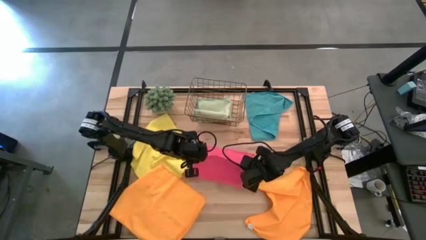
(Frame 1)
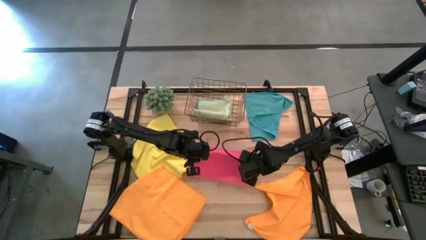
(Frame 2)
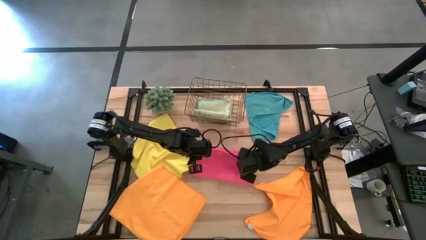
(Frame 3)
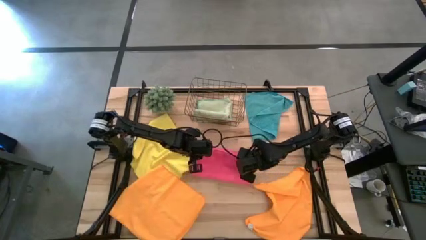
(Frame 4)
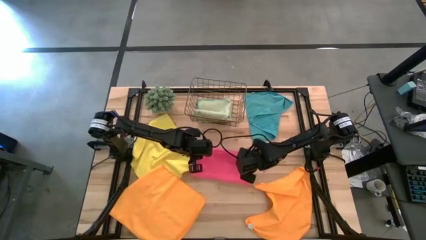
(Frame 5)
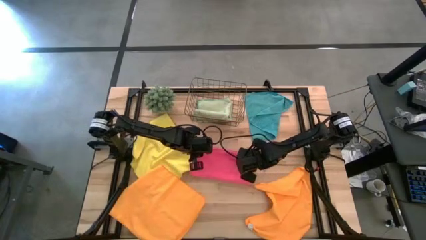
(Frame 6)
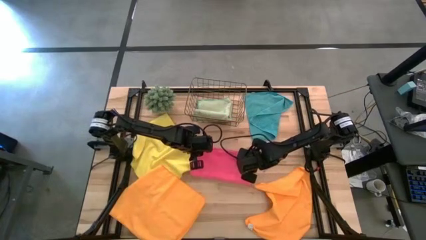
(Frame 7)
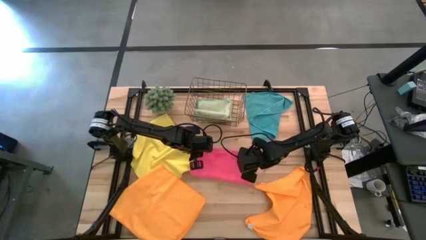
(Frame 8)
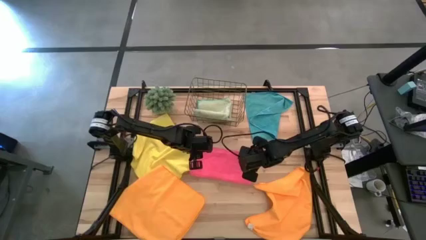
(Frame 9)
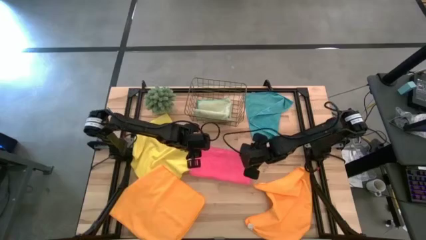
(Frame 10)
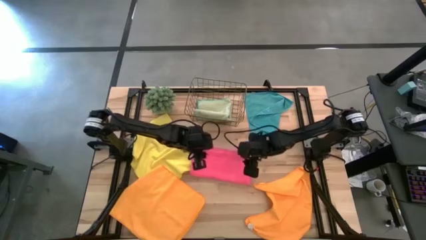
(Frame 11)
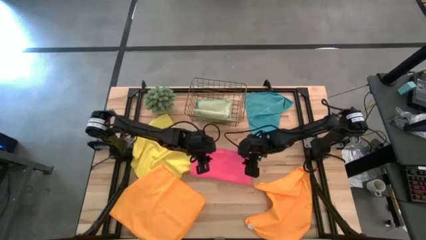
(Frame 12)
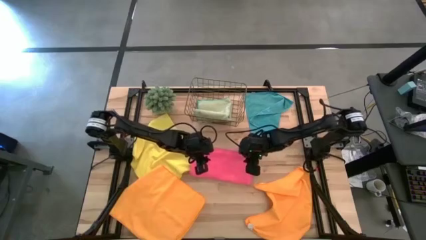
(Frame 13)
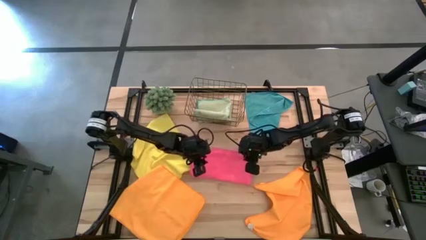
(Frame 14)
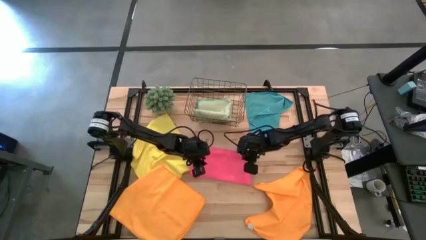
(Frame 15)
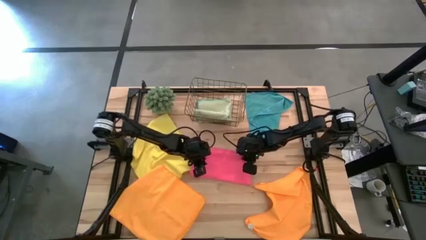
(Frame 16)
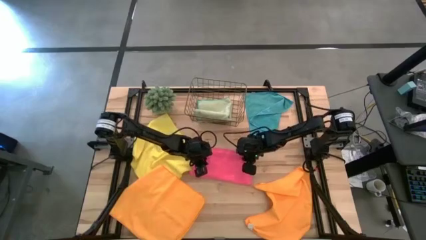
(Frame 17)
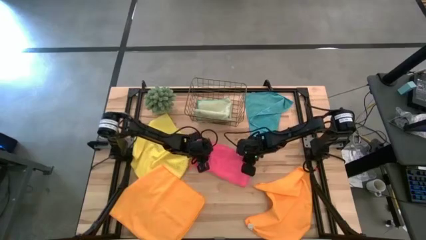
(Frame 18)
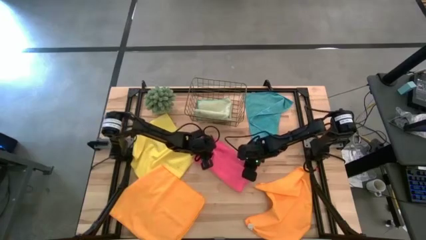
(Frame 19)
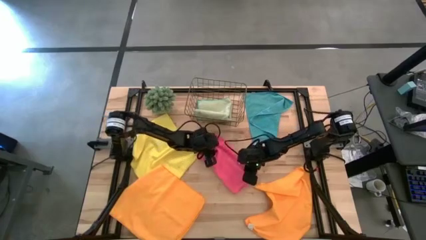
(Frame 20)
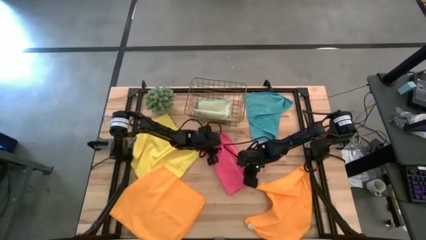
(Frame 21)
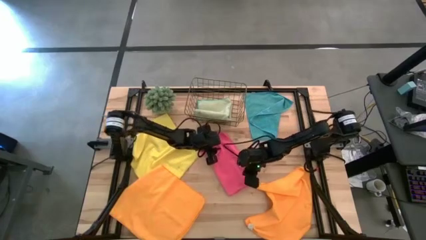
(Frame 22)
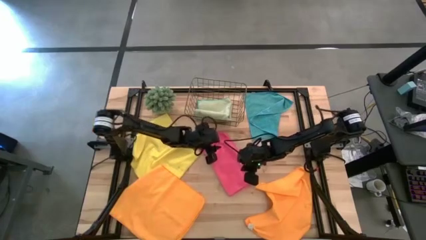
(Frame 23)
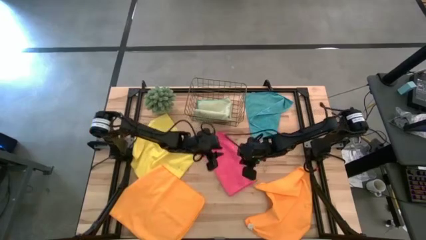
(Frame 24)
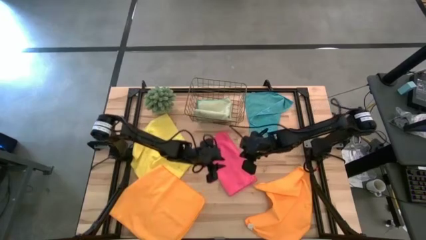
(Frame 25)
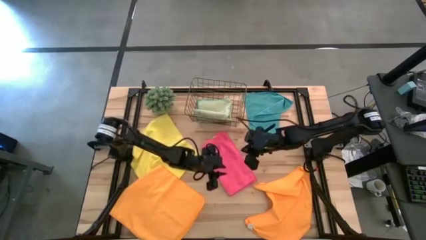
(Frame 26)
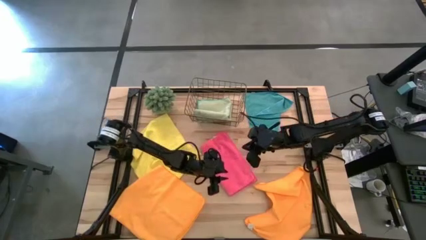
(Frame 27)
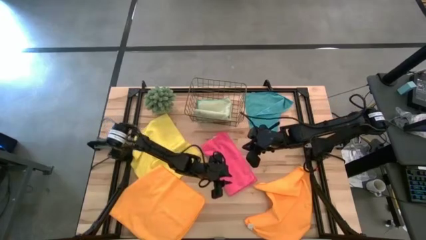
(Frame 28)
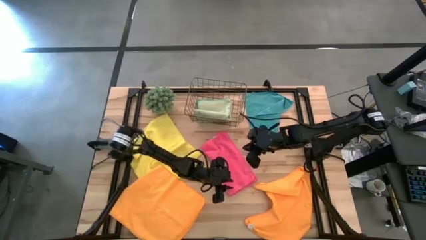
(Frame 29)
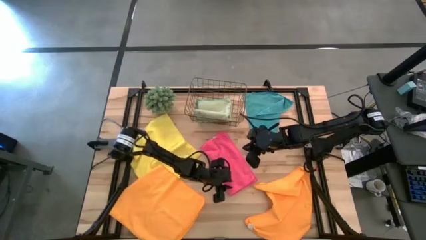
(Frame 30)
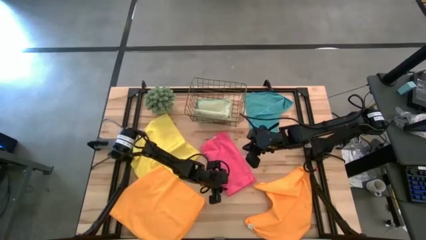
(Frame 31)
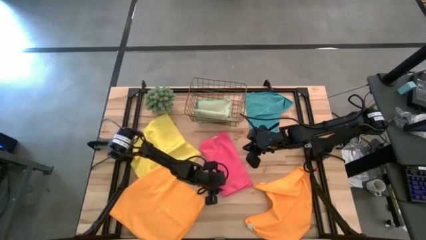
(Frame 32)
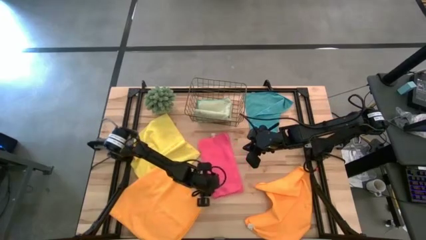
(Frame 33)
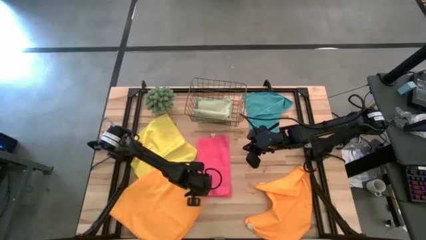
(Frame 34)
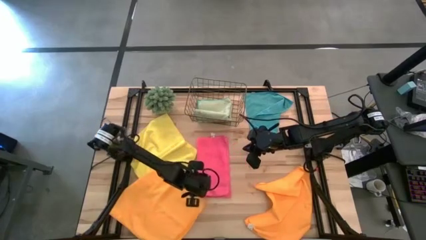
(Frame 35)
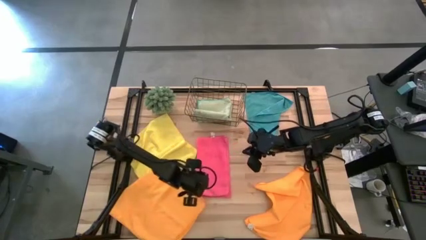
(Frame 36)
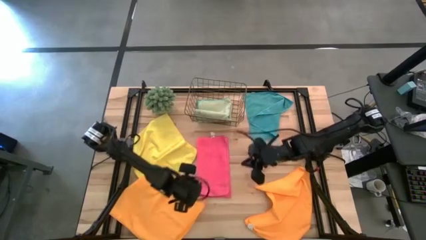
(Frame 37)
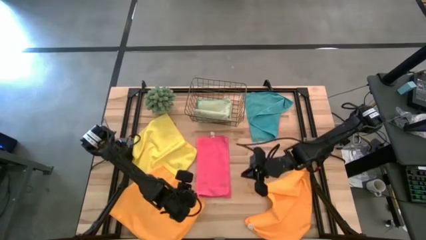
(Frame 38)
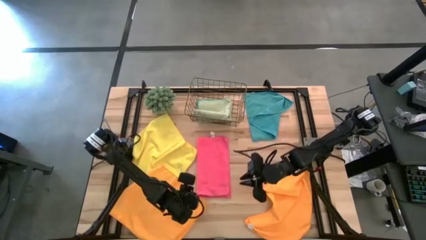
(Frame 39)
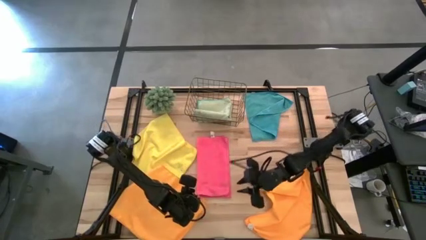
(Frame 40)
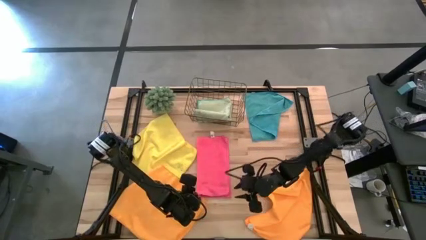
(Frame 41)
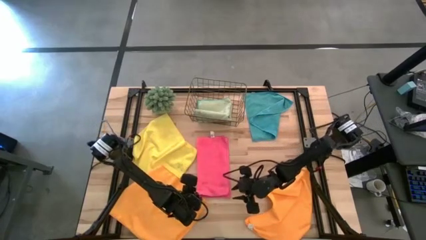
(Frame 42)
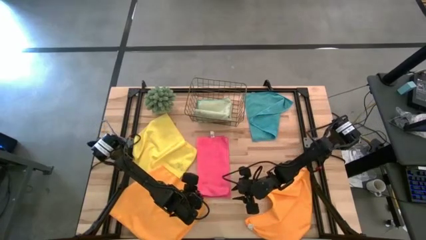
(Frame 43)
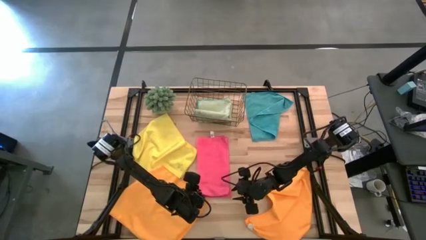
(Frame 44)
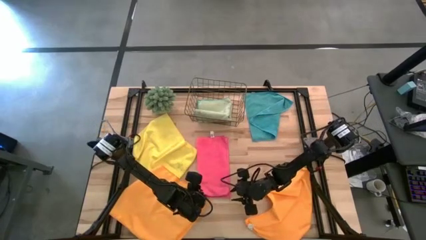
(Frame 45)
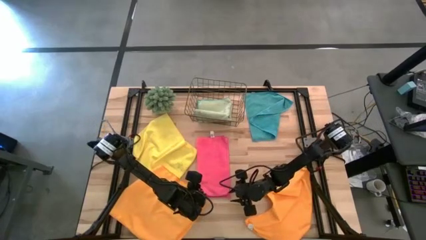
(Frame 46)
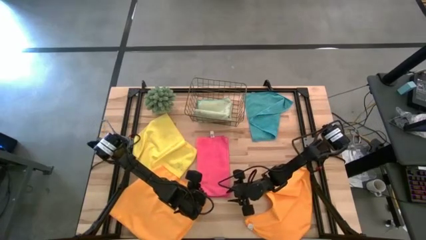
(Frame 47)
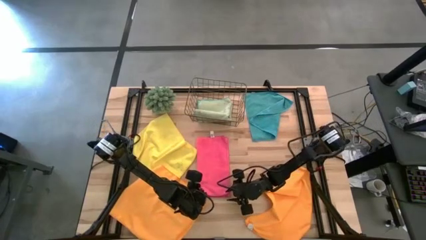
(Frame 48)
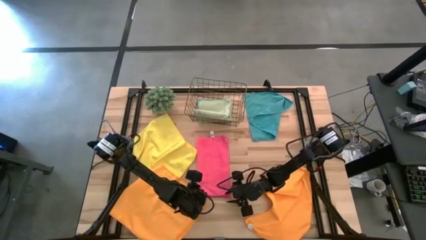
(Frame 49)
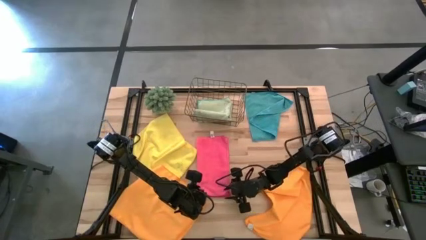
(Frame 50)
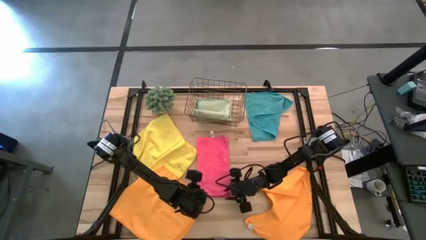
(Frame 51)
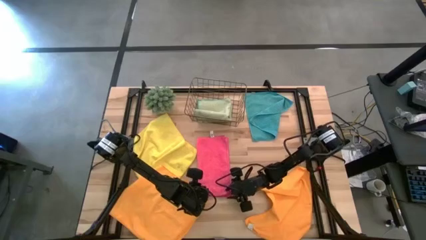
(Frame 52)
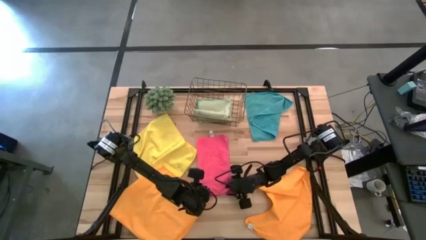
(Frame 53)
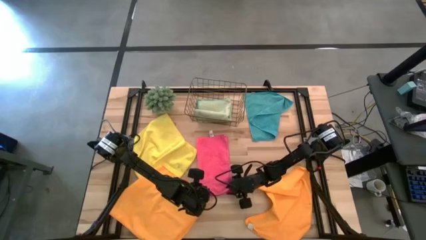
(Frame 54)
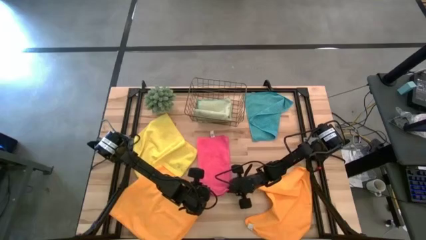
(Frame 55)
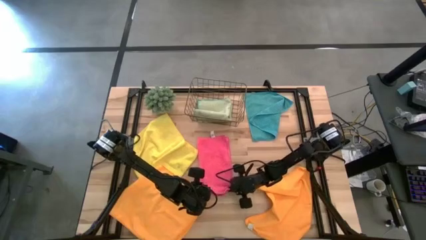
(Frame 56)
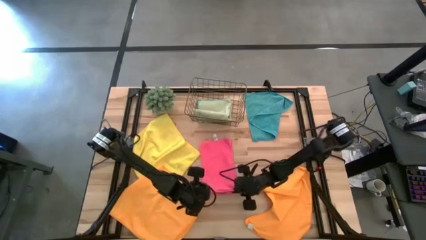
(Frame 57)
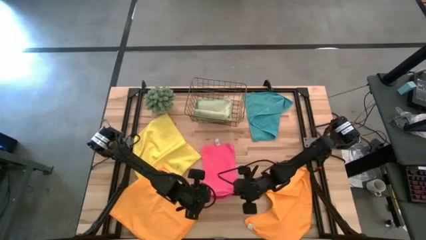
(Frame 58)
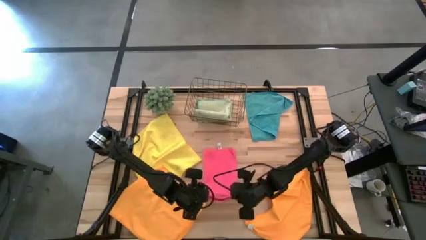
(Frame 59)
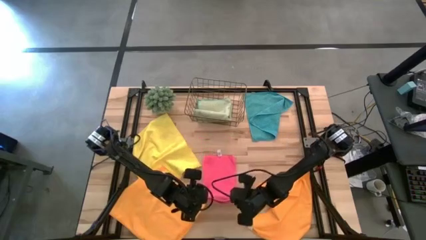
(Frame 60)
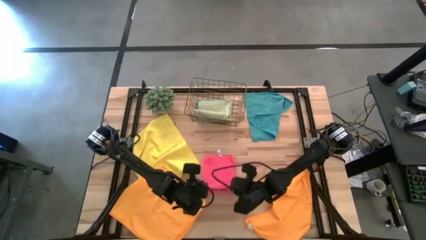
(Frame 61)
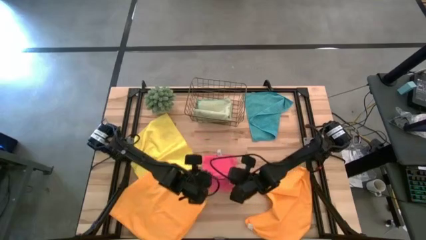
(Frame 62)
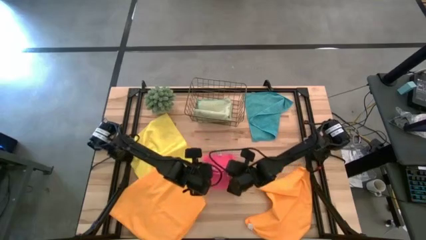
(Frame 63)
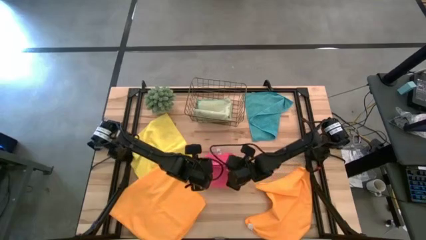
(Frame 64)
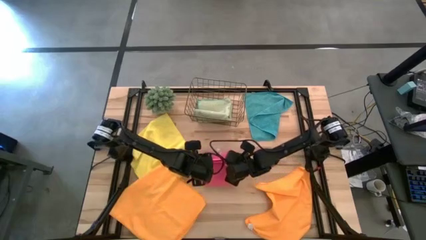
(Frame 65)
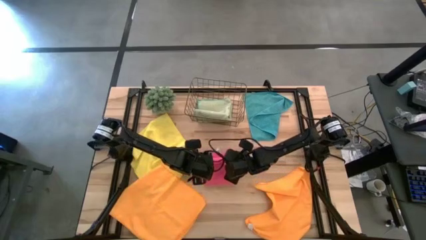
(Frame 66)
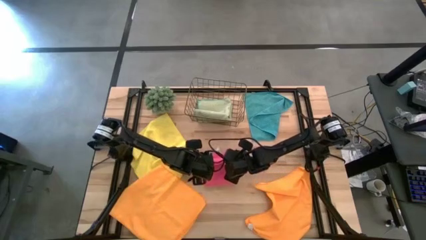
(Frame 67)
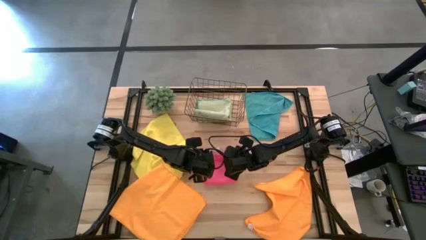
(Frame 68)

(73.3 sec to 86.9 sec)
Task: Fold microfiber towels
Fold the pink towel
